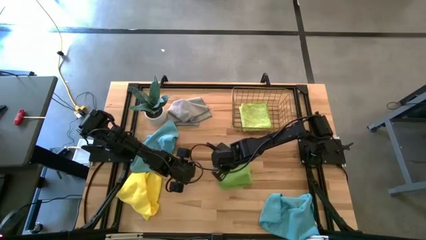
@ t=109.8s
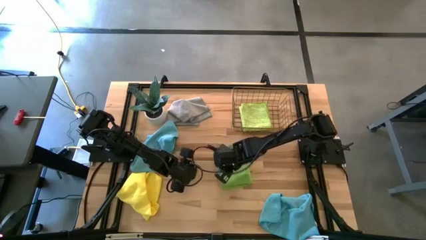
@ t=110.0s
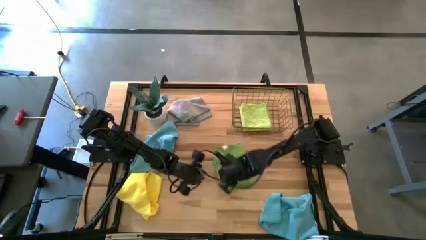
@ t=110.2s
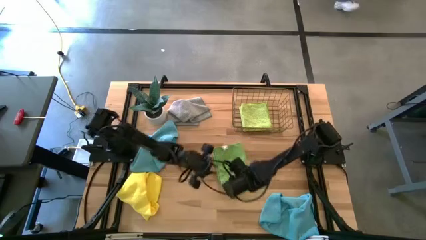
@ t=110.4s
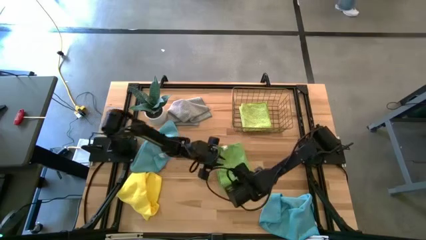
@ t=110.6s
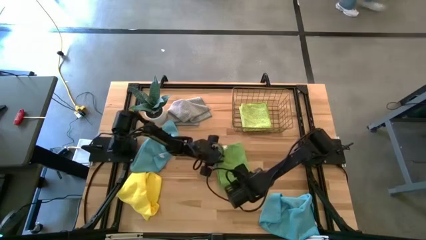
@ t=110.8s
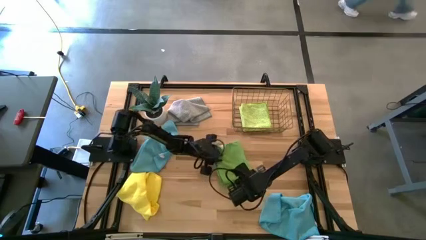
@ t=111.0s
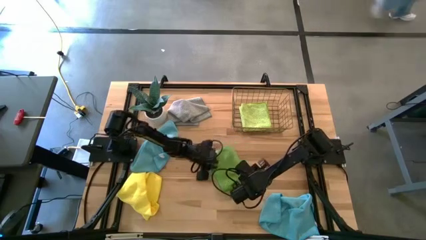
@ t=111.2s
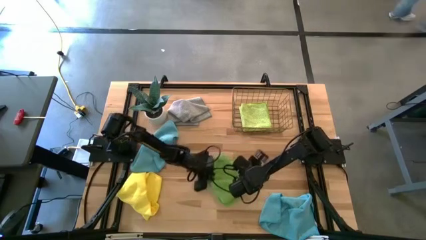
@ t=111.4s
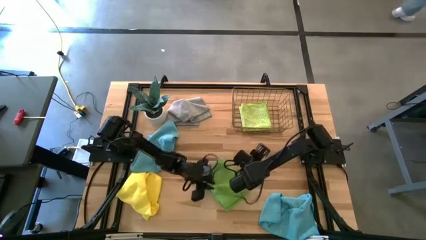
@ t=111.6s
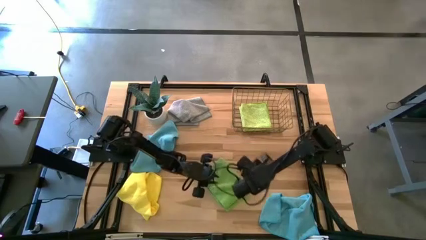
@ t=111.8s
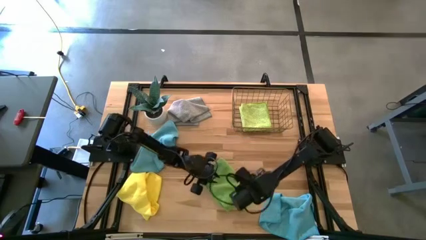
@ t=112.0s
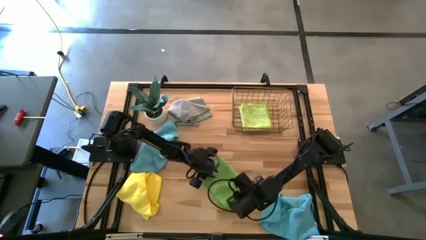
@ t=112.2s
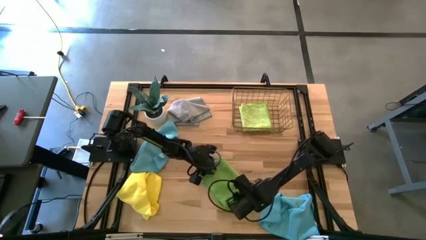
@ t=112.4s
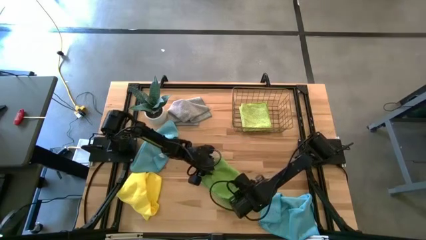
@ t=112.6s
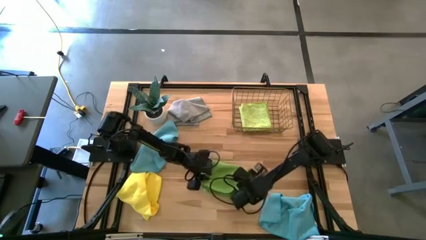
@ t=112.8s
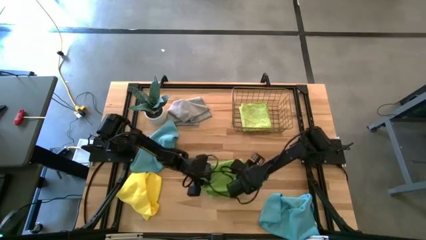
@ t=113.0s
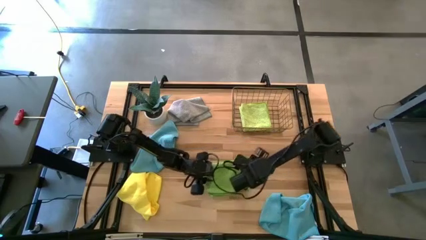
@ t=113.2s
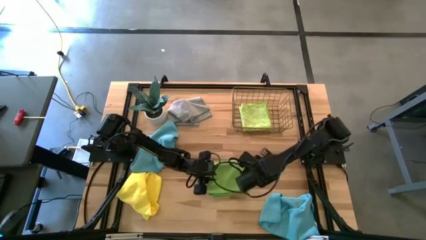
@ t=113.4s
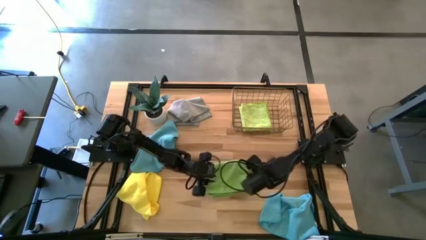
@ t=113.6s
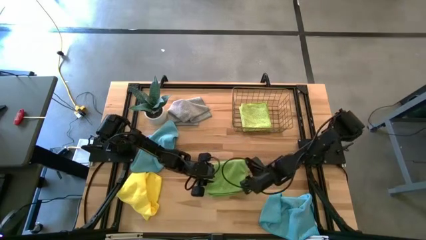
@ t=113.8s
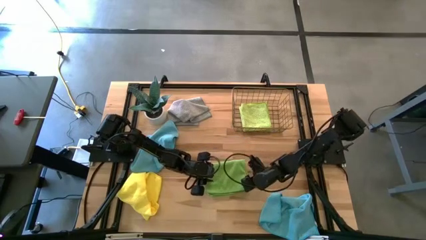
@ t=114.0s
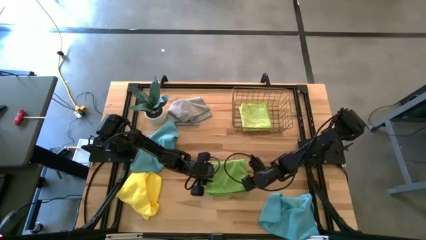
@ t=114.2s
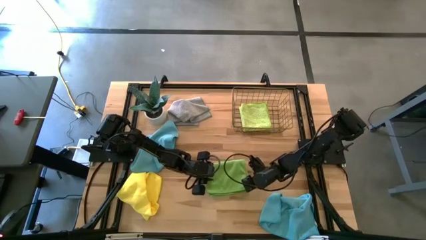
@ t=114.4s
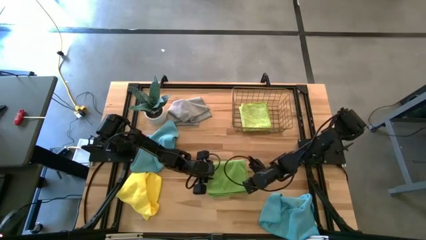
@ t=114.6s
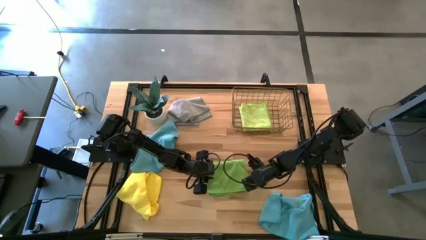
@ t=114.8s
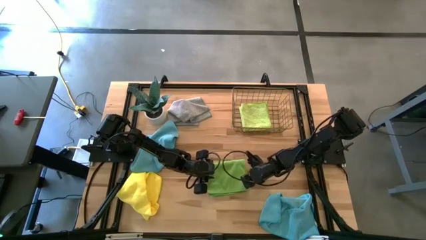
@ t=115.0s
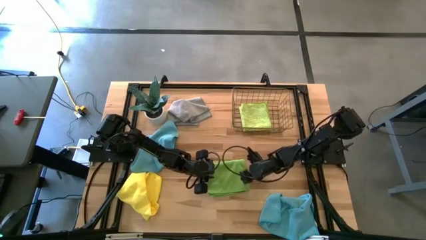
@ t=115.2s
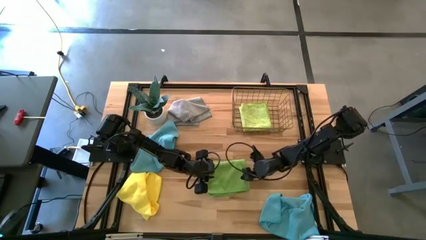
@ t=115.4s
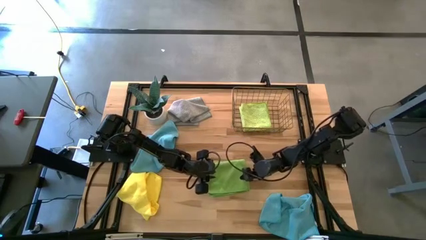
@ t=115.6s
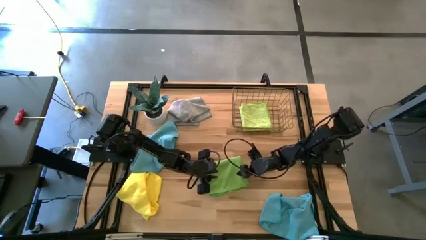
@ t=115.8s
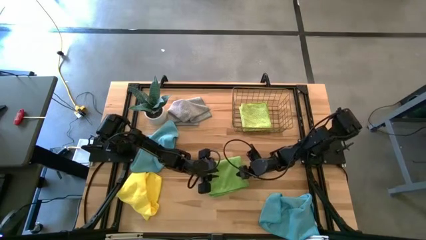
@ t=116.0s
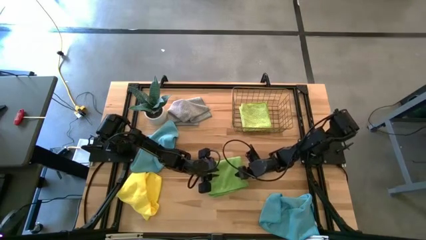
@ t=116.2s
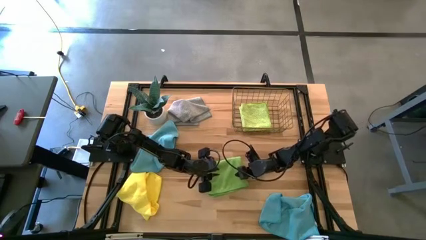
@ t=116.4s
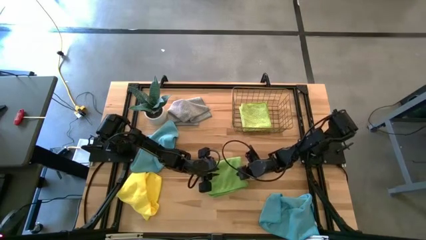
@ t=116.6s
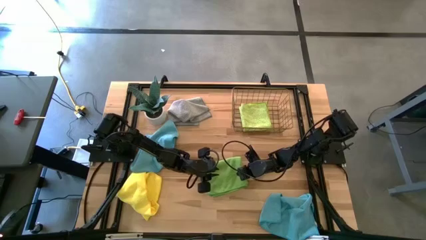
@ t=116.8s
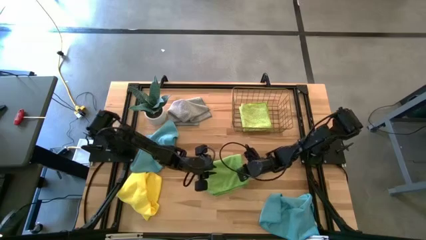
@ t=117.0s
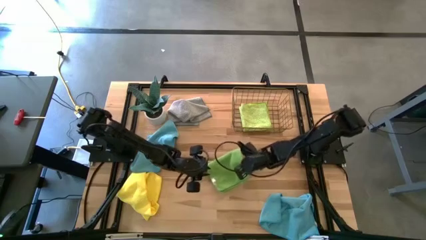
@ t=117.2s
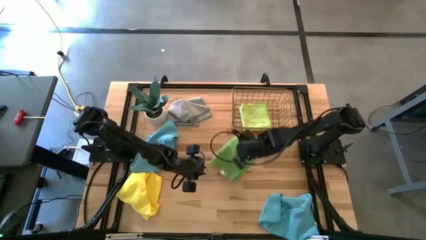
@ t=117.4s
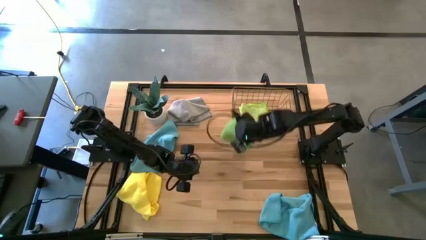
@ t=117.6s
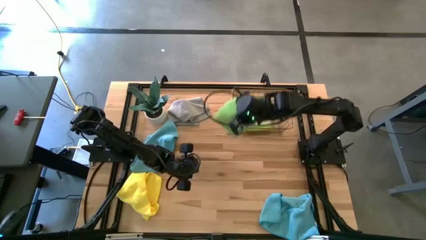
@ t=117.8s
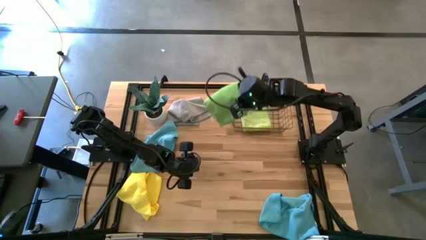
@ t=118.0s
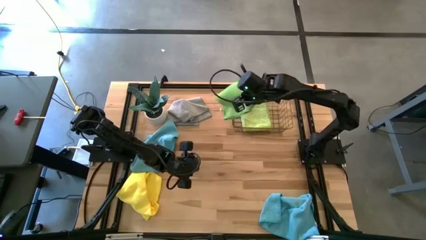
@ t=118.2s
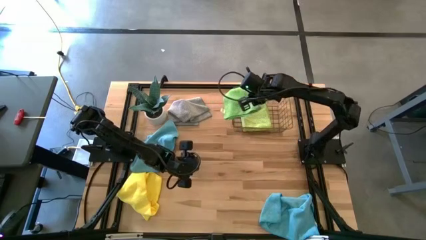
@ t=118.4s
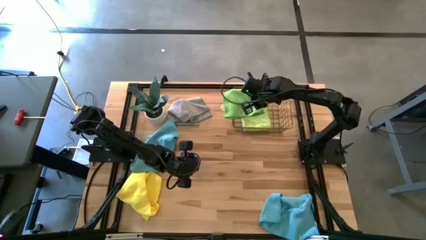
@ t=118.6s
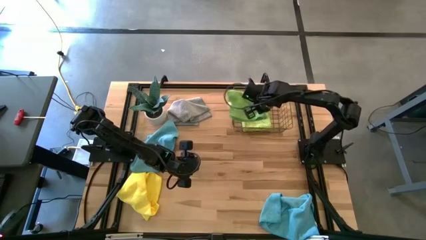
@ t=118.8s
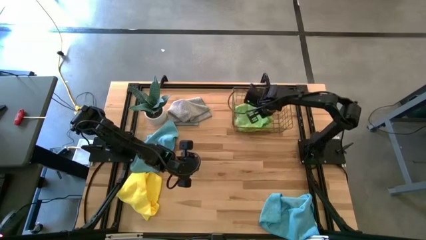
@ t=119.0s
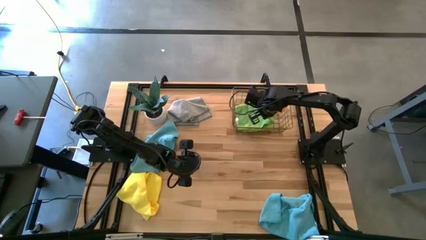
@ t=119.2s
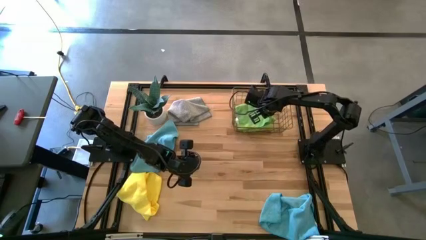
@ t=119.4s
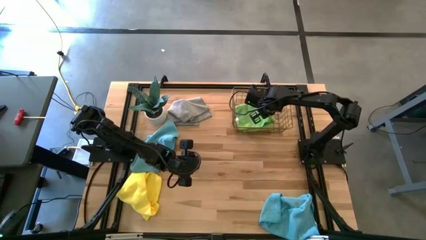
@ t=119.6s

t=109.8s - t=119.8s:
Task: Fold microfiber towels
Put the folded green microfiber towel into the wire basket
